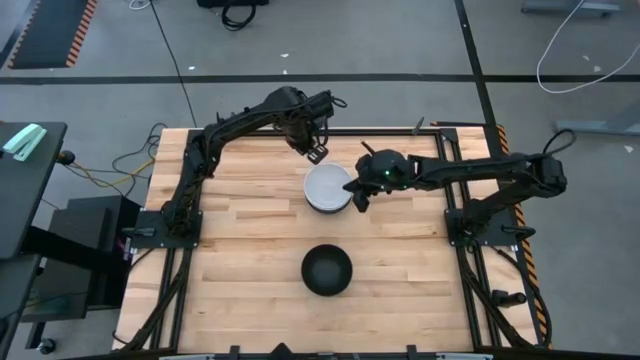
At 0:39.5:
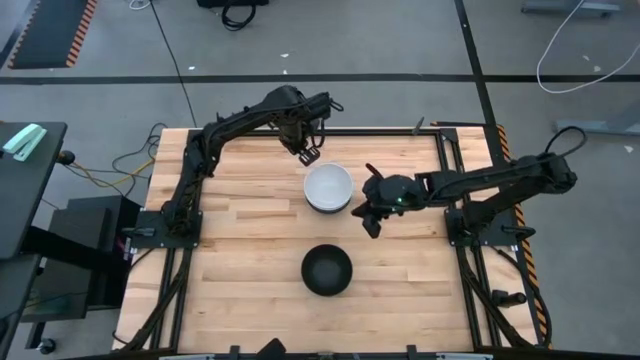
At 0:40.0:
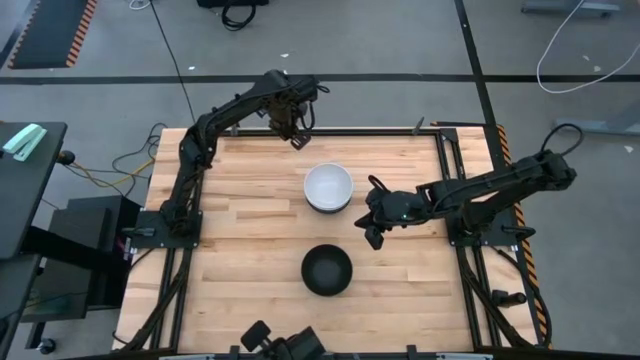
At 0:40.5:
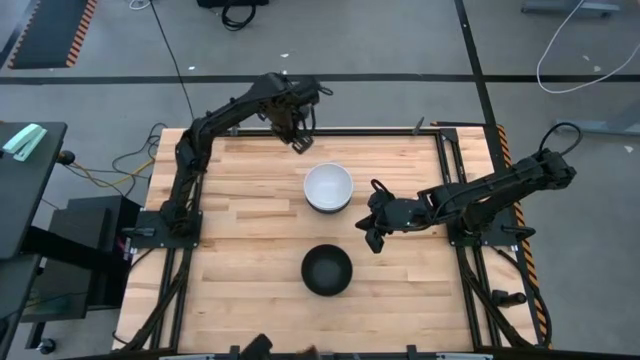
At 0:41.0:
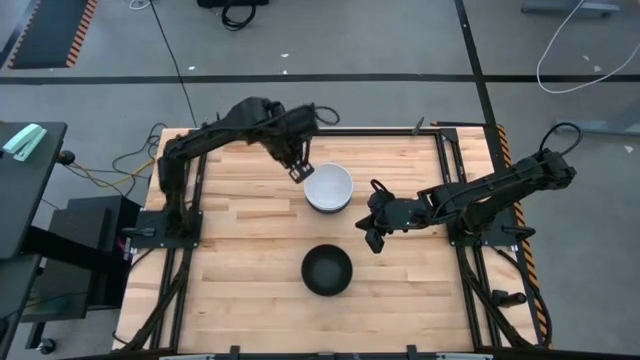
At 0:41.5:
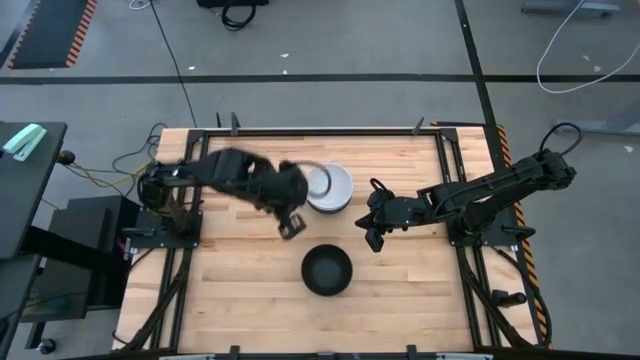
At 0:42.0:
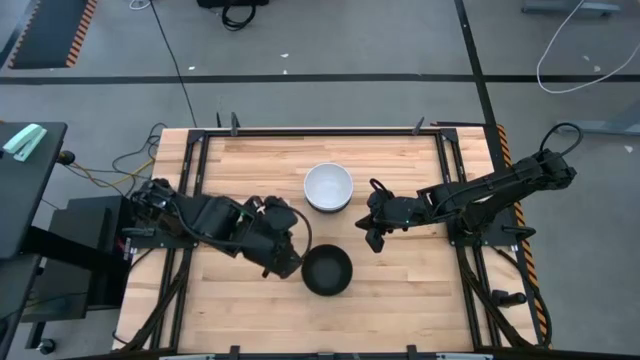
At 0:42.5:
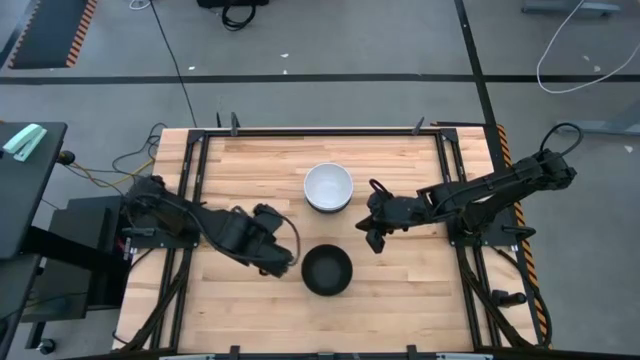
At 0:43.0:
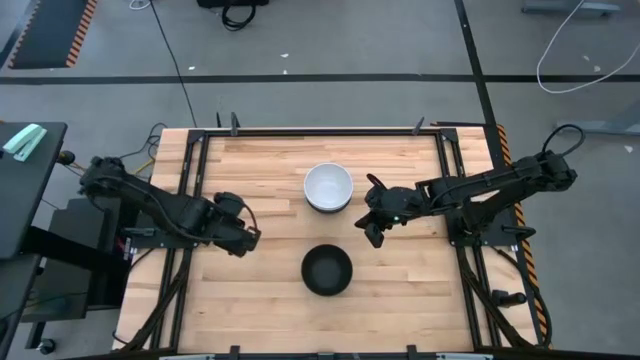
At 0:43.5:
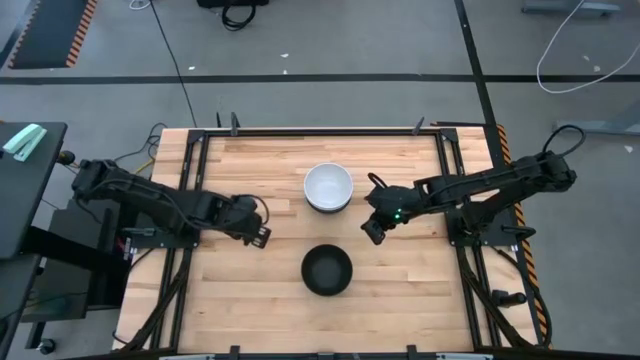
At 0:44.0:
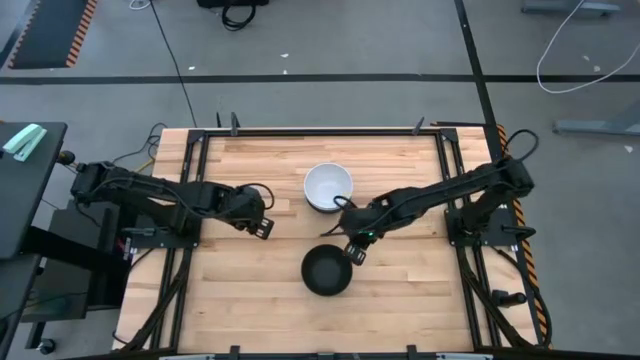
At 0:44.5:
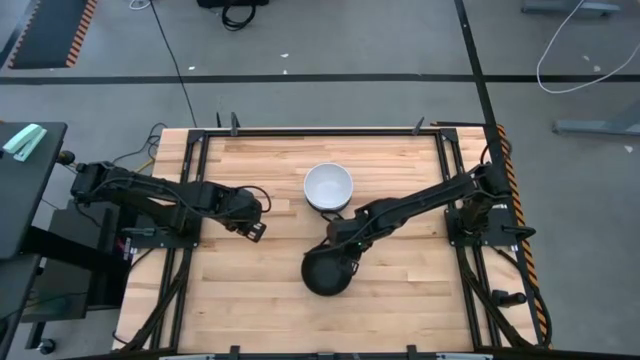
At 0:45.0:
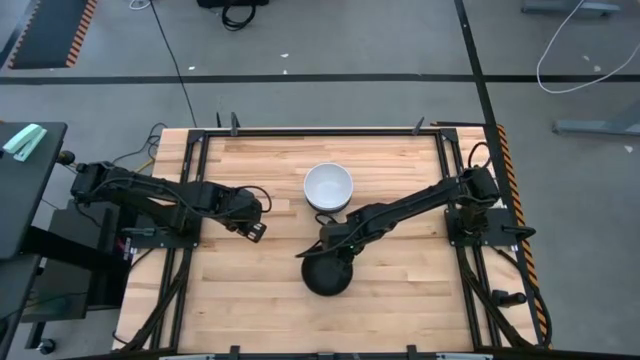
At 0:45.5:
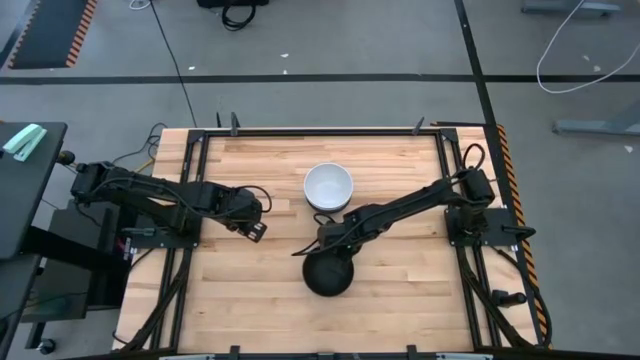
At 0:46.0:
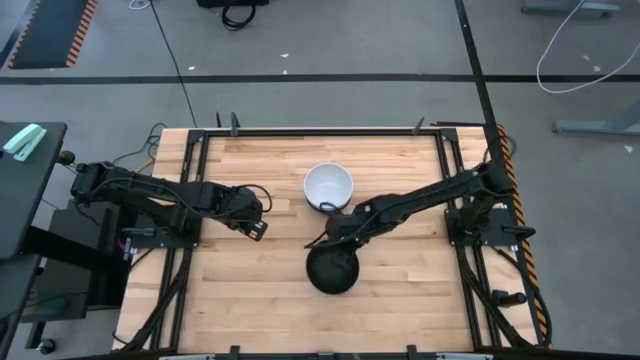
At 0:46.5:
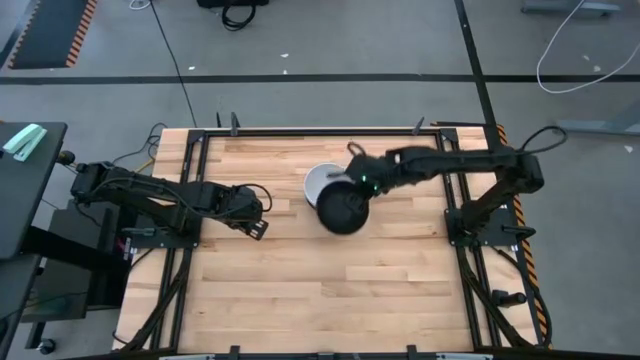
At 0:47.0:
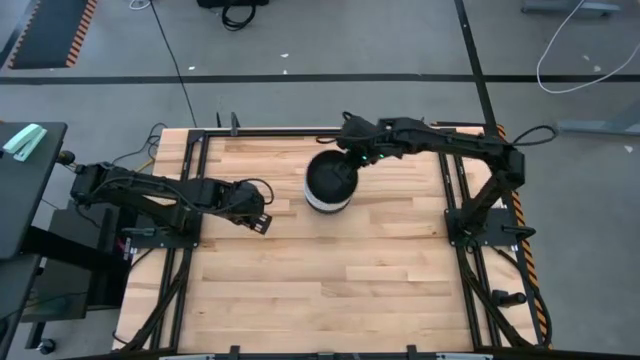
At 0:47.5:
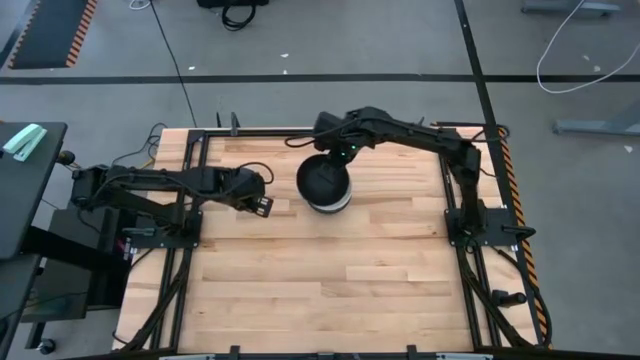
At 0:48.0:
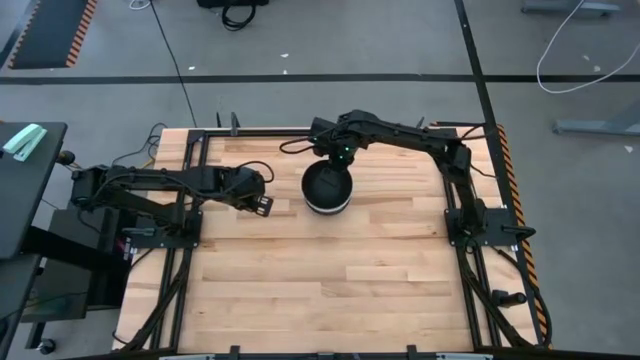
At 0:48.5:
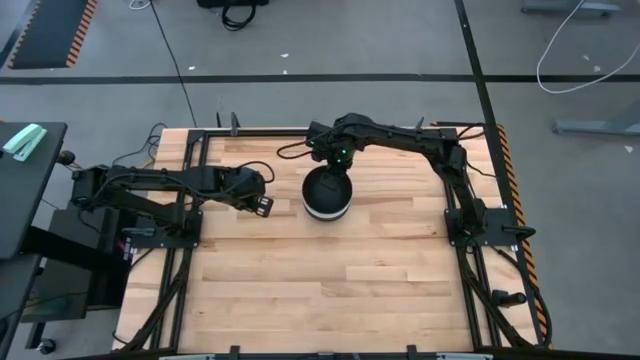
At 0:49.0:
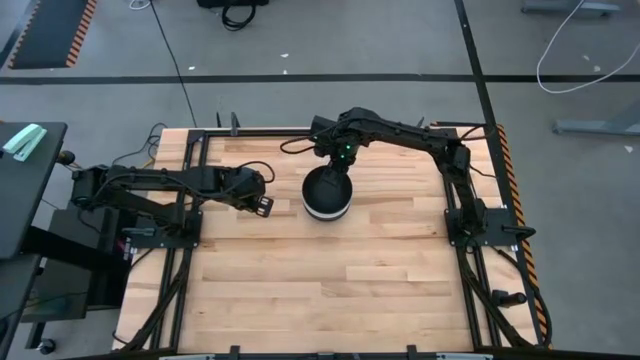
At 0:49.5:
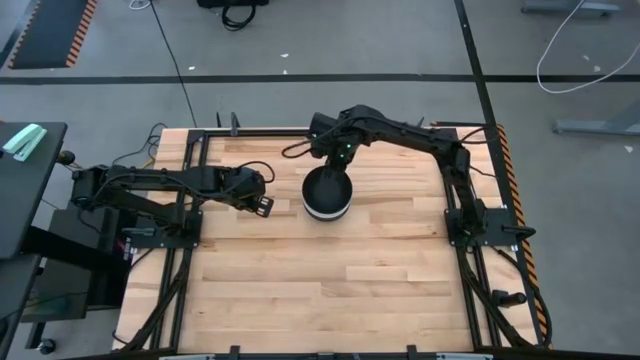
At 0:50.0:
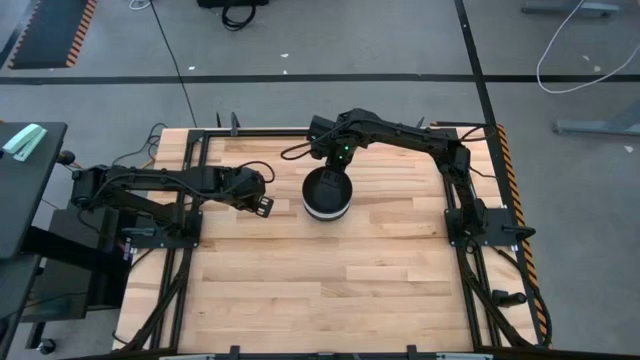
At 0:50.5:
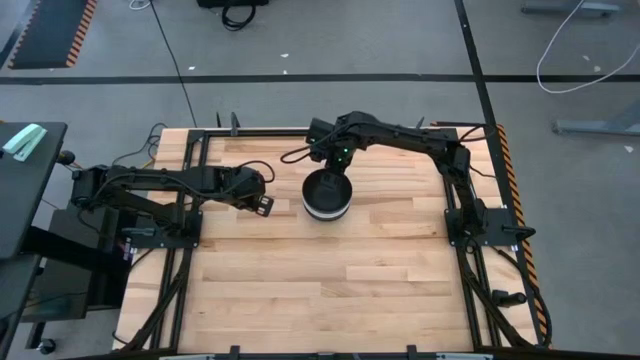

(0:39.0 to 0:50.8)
Task: Nest bowls inside each other
Stack the black bowl on top of the white bowl

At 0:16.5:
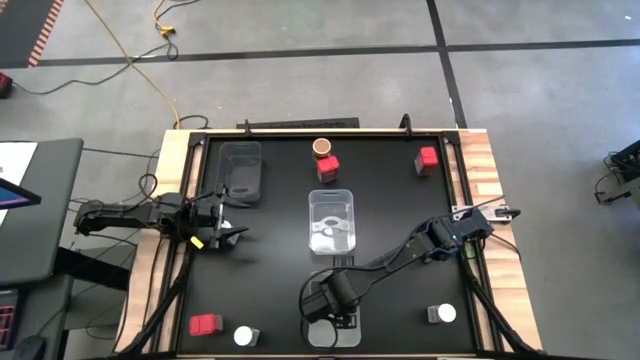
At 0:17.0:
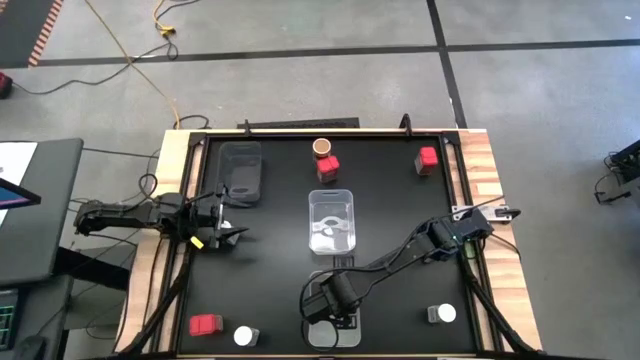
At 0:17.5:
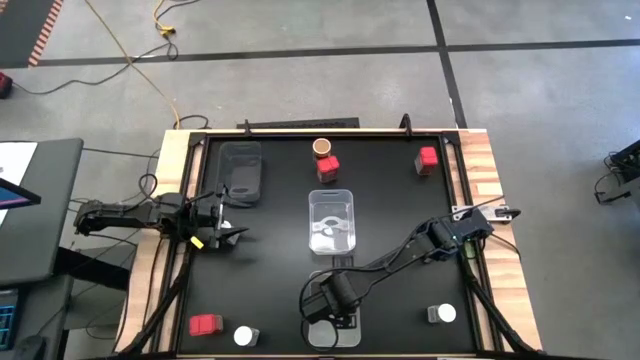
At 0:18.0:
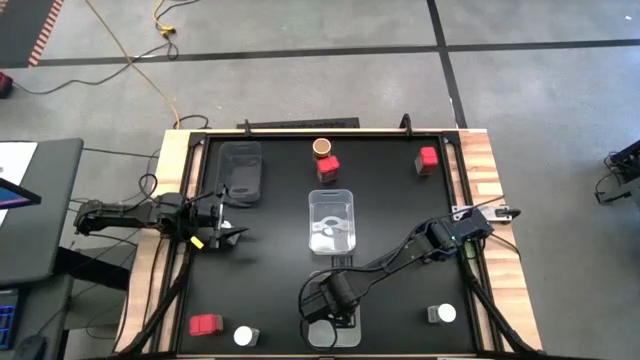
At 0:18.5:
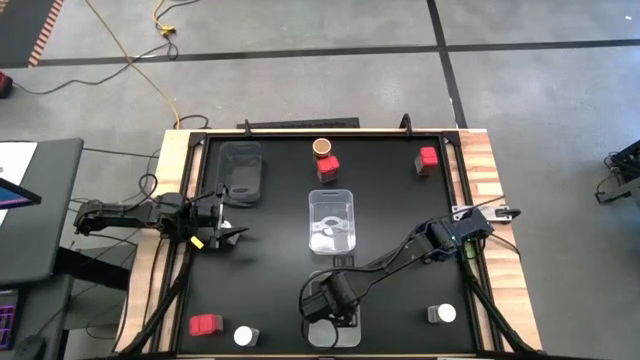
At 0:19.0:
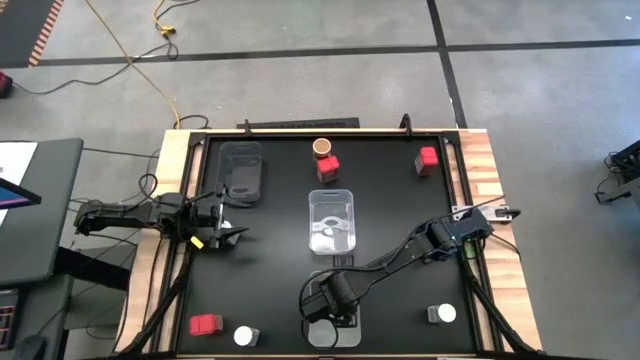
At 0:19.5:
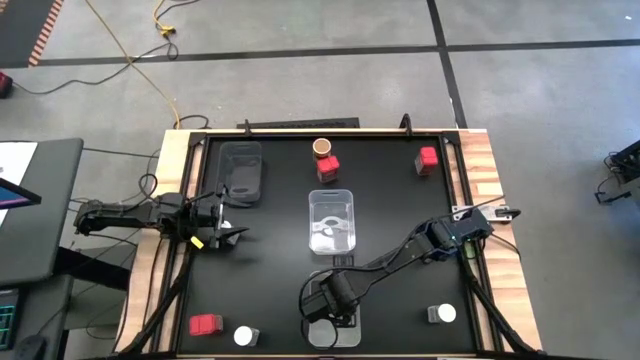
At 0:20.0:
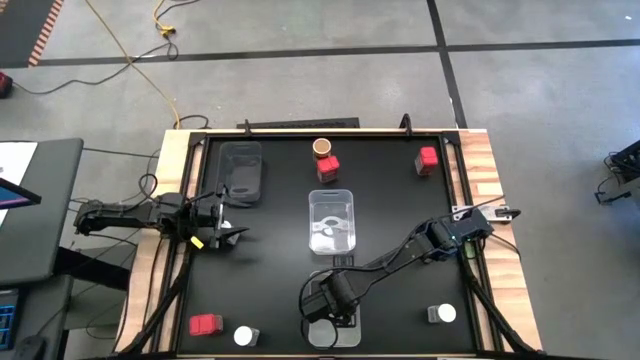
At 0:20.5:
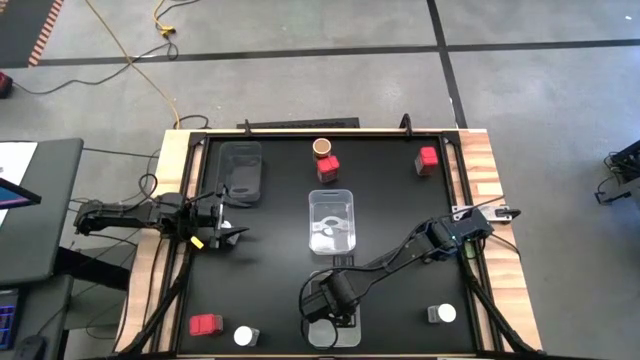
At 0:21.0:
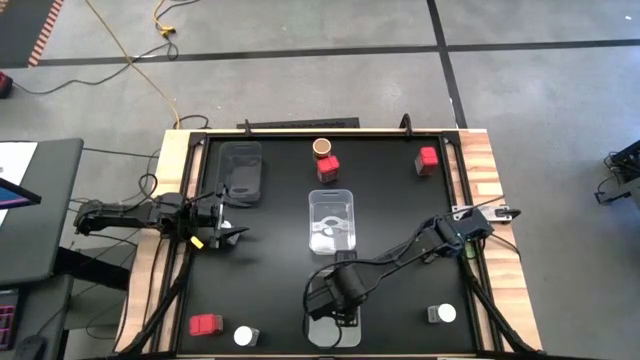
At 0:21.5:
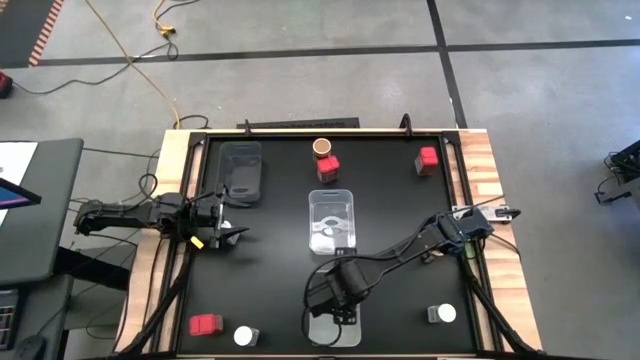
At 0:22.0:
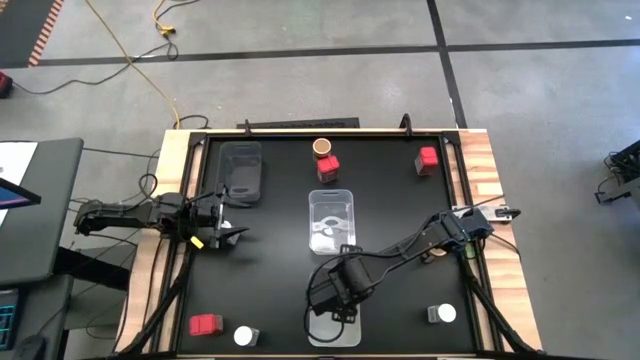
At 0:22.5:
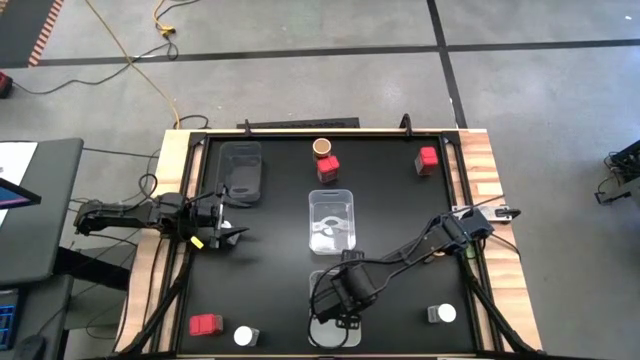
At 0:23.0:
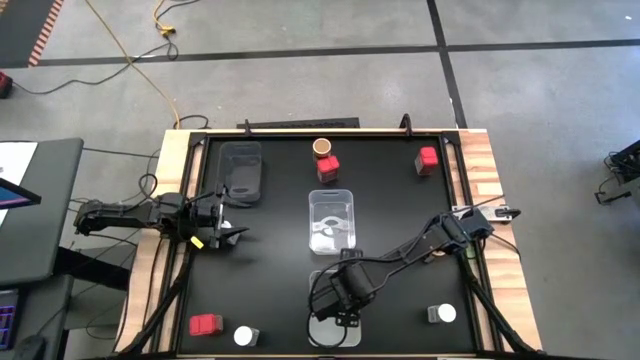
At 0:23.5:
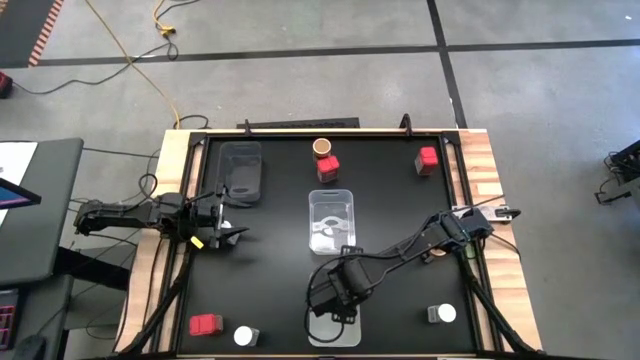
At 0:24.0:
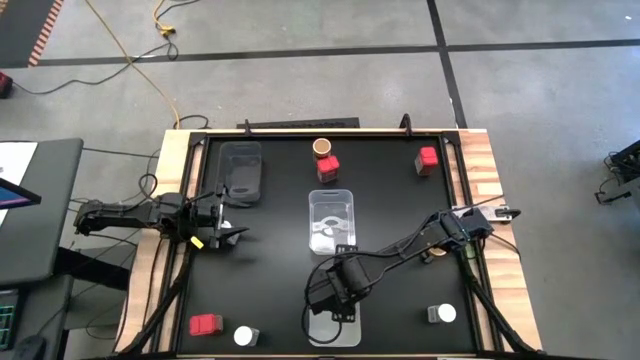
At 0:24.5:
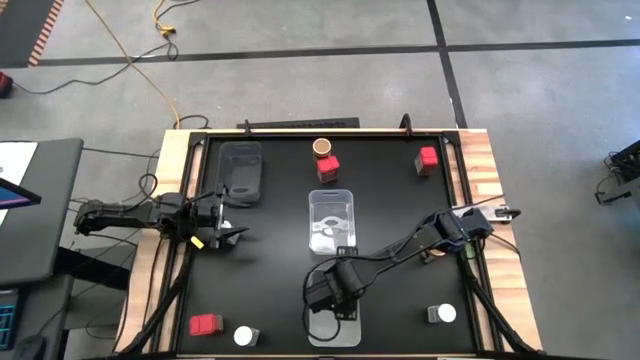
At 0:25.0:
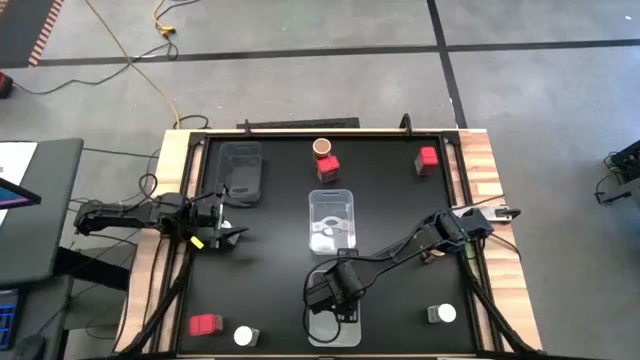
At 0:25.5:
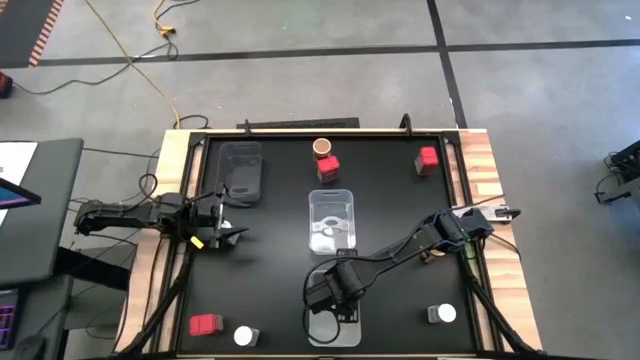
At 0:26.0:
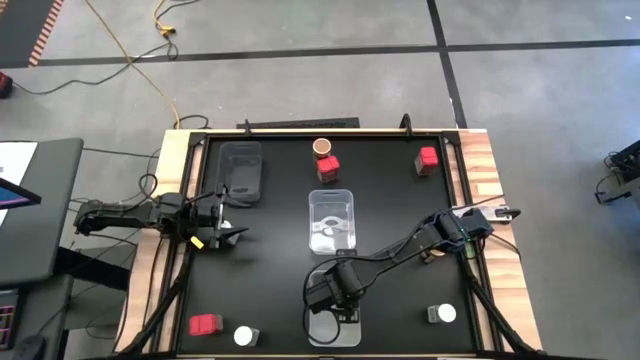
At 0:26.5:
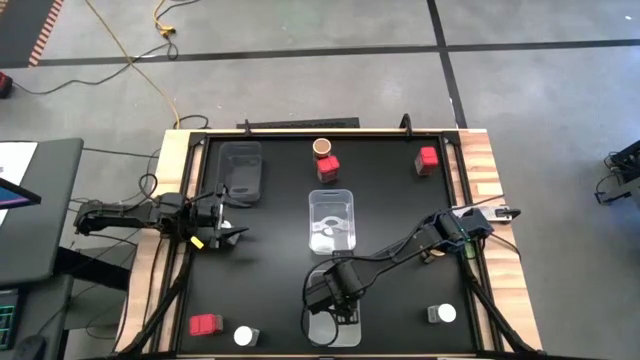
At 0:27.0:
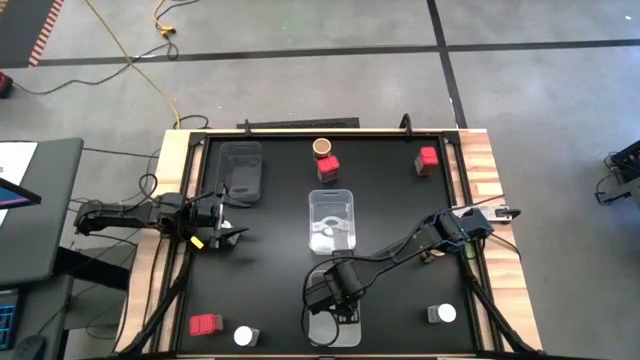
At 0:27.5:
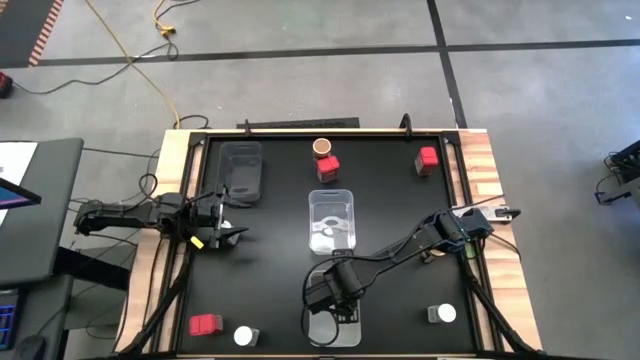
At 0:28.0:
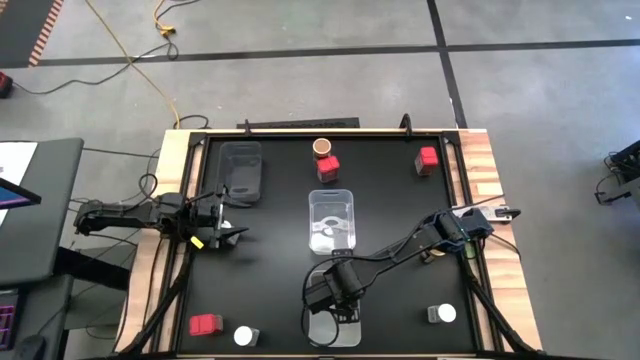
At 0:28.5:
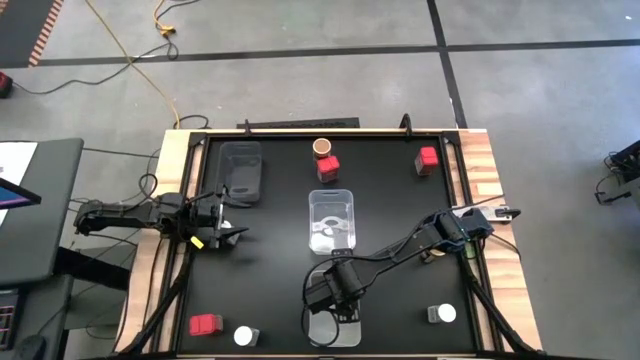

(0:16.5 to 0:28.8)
Task: Sort spices by type
Put the white seasoning bottle into the white bin
